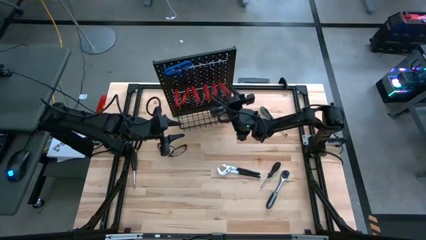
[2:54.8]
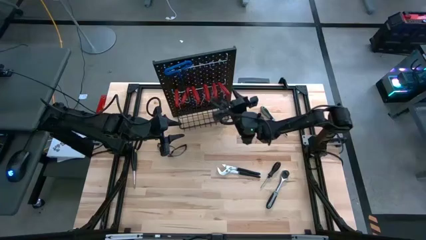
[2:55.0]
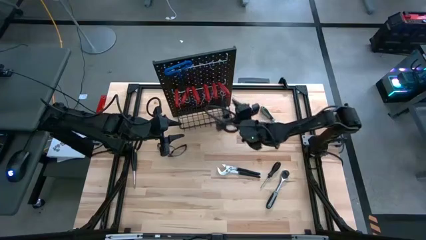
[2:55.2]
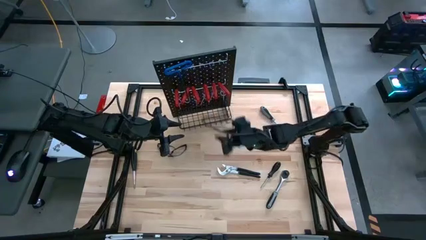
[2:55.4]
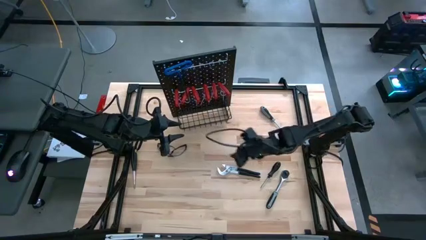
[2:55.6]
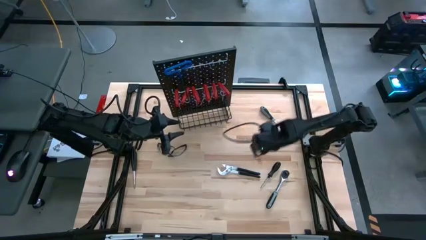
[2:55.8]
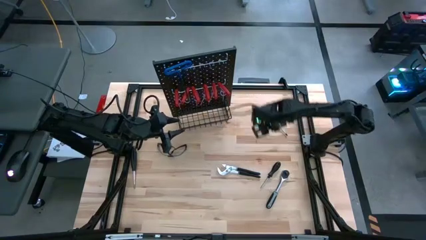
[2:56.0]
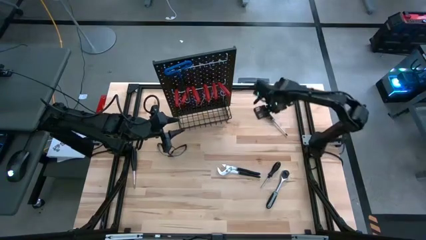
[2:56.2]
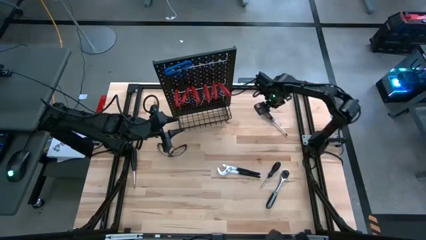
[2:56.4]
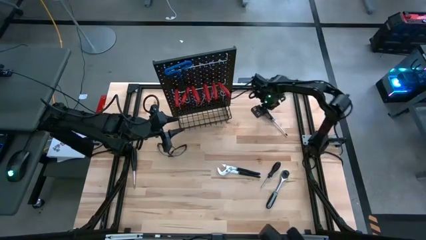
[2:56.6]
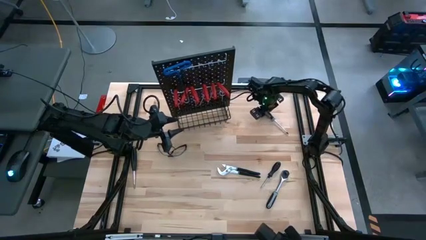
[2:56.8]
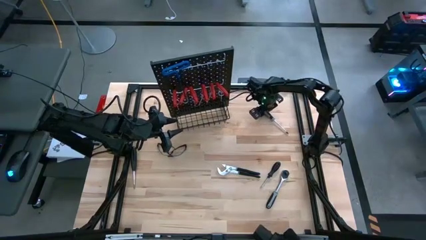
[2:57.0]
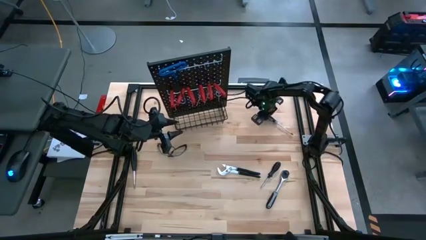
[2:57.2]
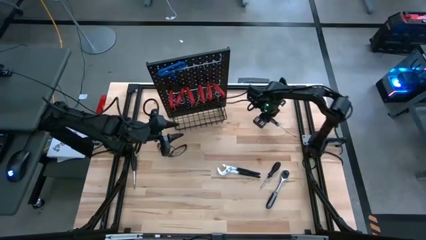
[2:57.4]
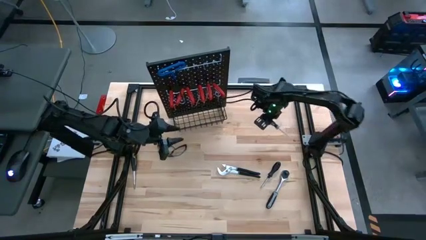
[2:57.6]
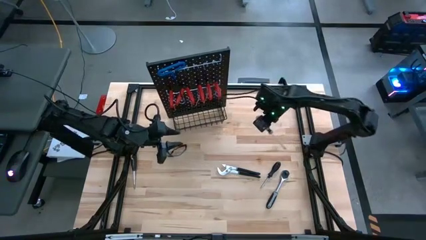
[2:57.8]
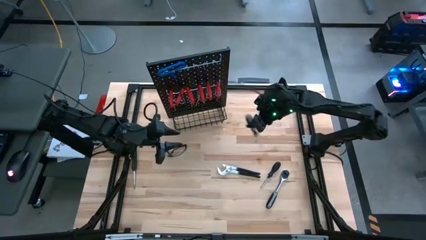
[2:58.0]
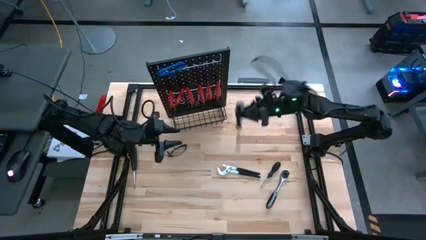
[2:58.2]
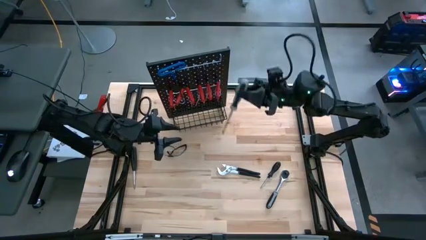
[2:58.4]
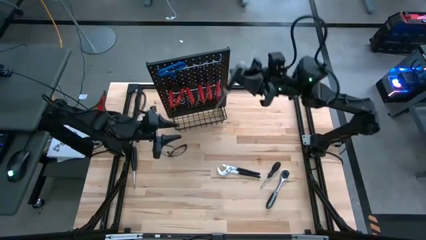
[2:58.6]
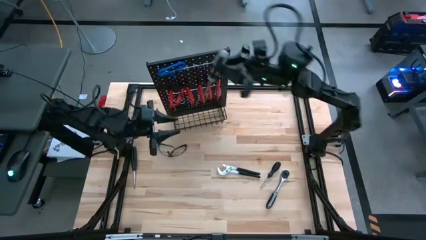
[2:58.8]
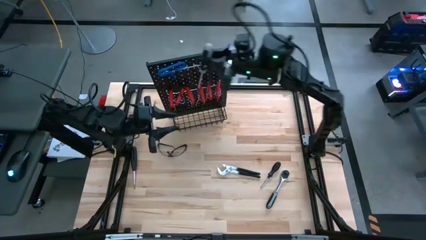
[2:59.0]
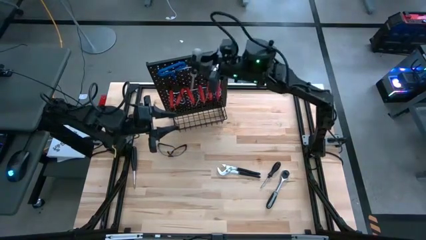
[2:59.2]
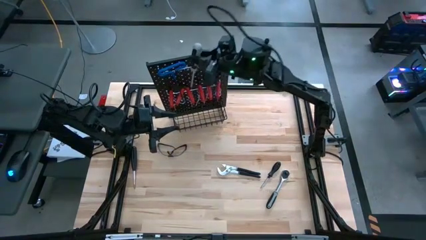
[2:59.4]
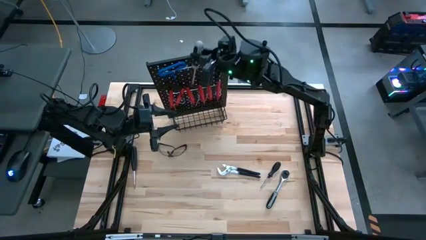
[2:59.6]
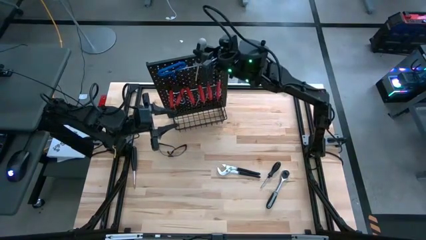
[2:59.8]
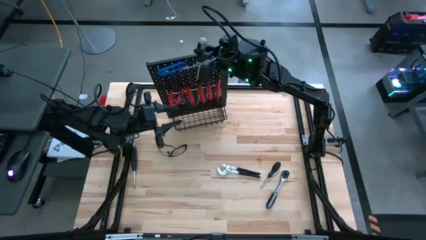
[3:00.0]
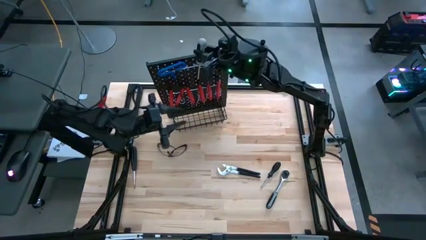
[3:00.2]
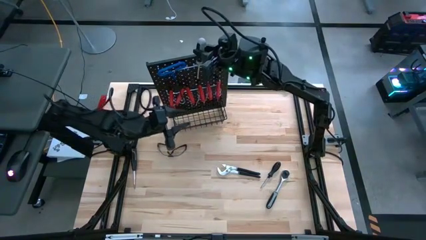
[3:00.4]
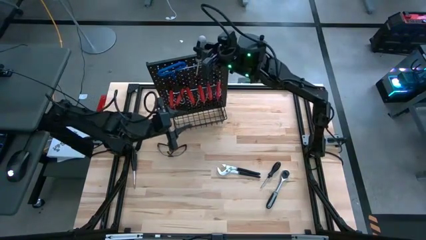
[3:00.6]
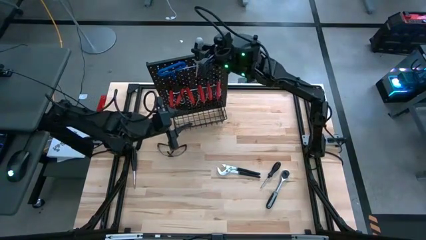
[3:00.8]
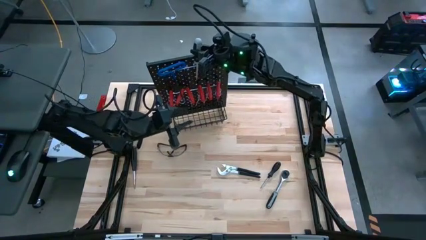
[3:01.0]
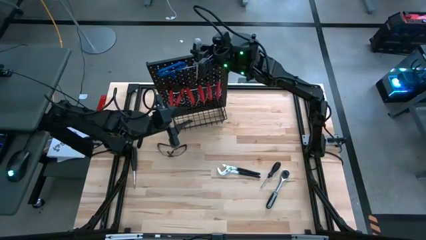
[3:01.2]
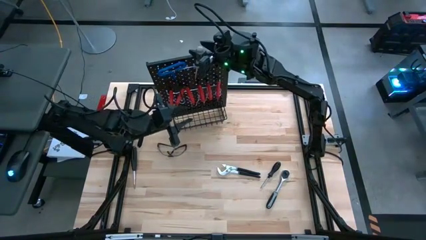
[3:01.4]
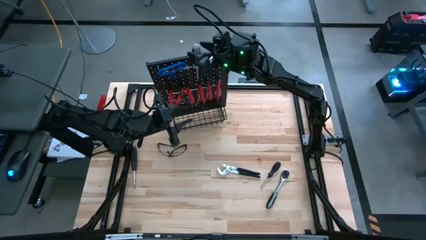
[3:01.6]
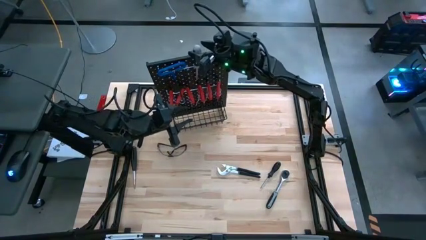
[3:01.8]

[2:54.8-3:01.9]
Task: Hang tools onto peg board
Hang the gray screwdriver on the peg board

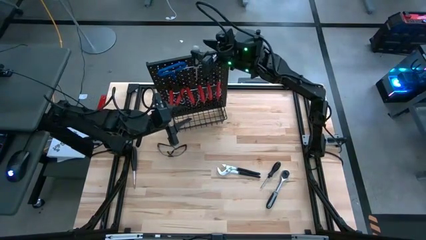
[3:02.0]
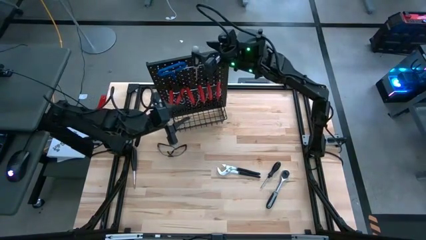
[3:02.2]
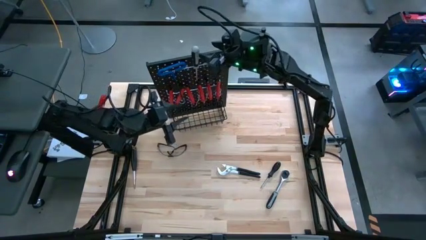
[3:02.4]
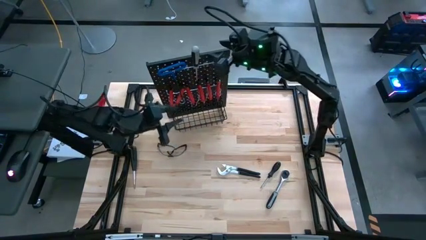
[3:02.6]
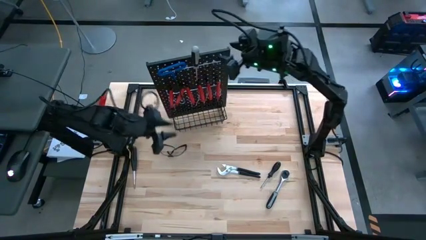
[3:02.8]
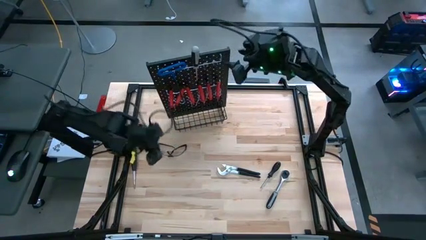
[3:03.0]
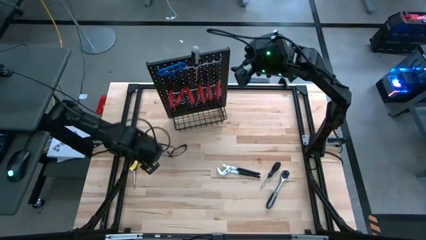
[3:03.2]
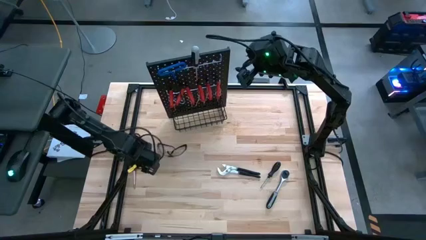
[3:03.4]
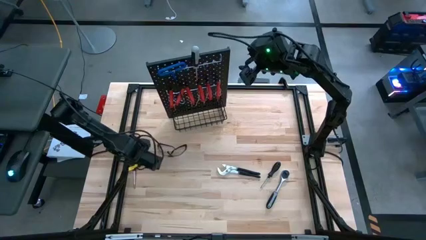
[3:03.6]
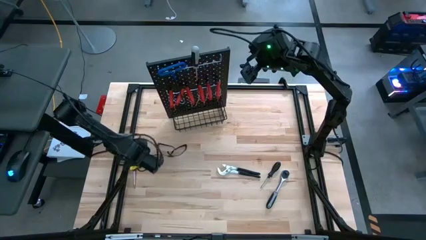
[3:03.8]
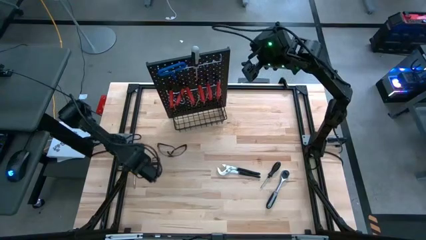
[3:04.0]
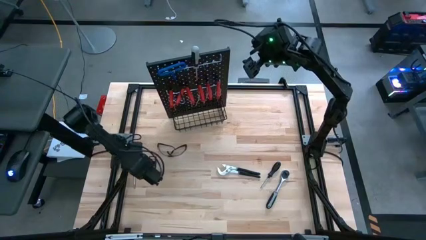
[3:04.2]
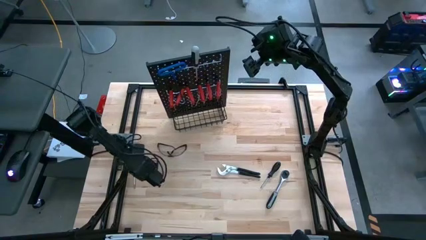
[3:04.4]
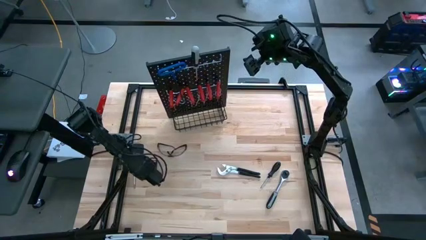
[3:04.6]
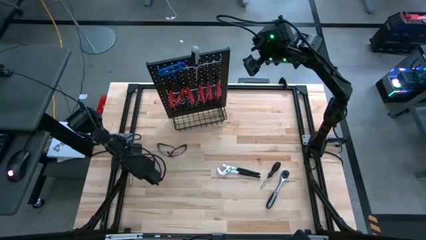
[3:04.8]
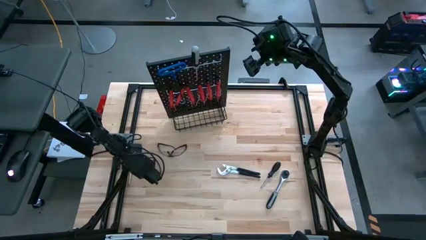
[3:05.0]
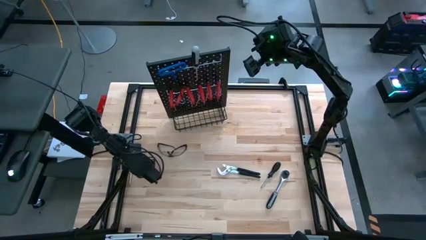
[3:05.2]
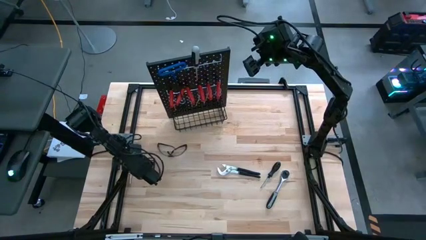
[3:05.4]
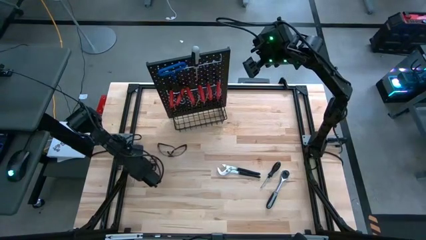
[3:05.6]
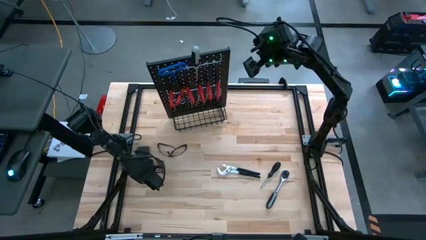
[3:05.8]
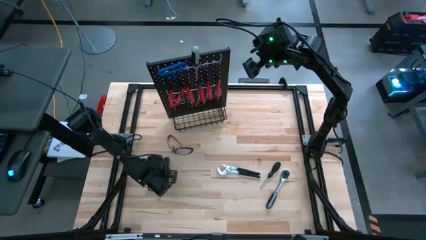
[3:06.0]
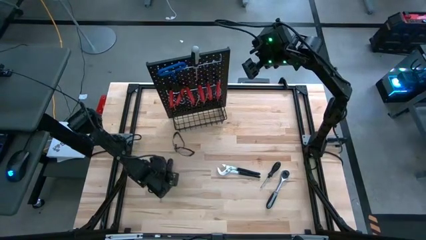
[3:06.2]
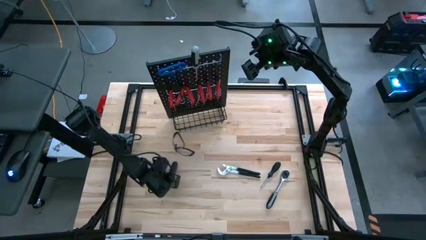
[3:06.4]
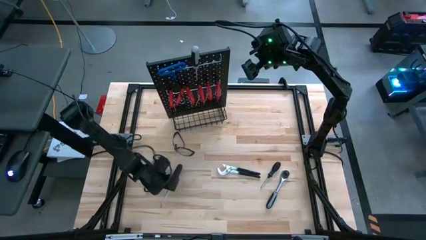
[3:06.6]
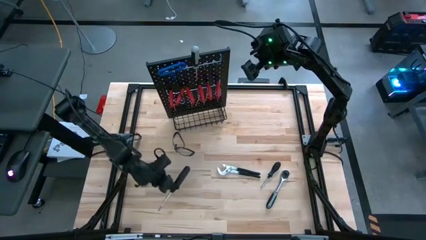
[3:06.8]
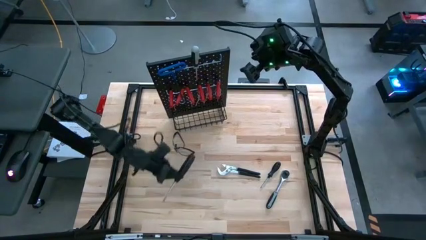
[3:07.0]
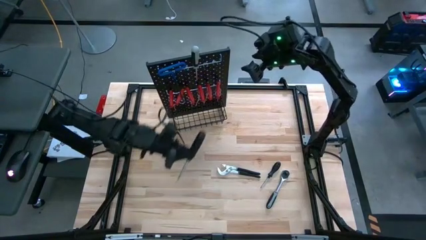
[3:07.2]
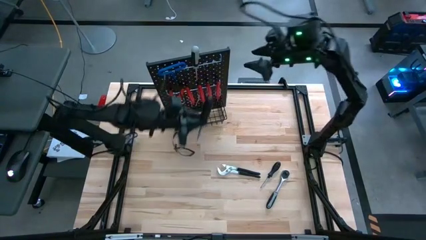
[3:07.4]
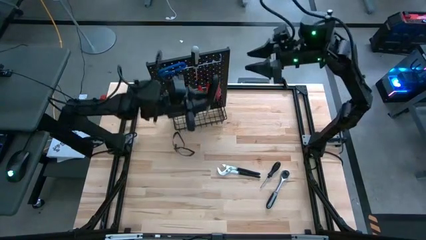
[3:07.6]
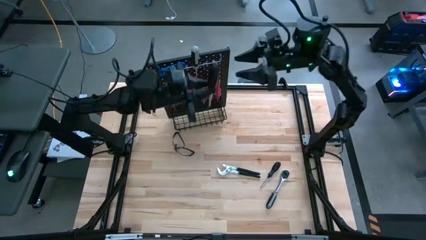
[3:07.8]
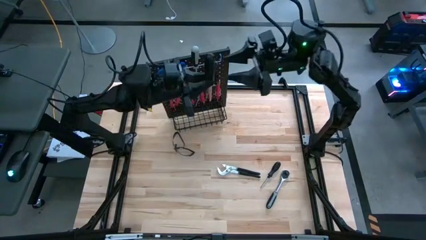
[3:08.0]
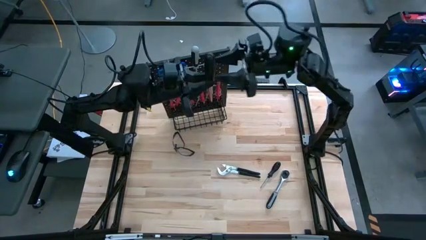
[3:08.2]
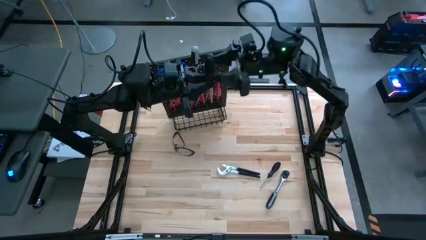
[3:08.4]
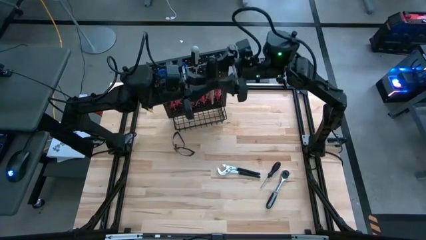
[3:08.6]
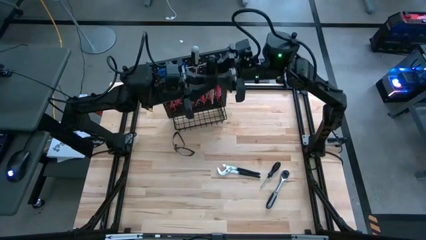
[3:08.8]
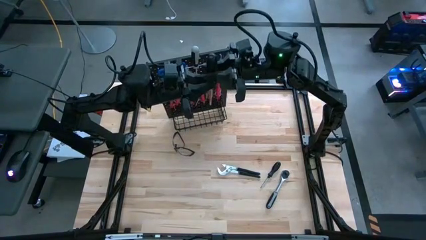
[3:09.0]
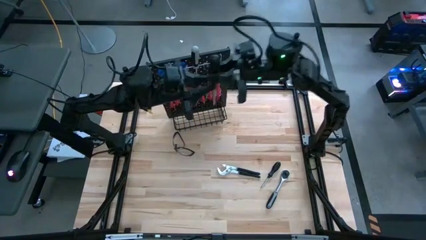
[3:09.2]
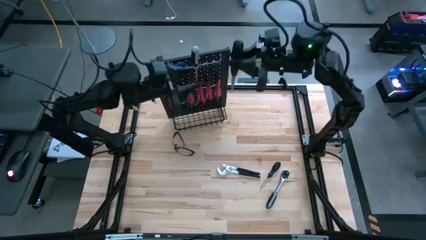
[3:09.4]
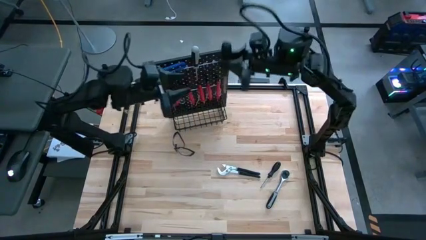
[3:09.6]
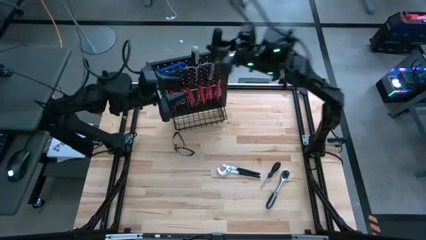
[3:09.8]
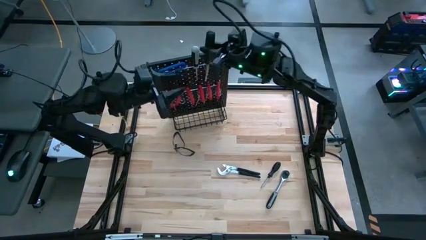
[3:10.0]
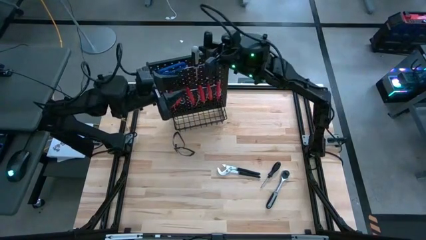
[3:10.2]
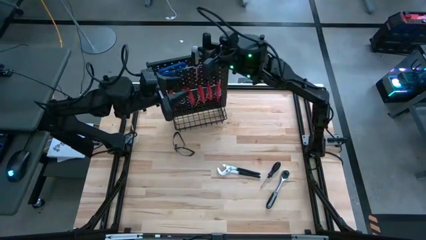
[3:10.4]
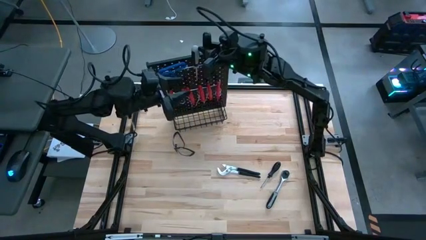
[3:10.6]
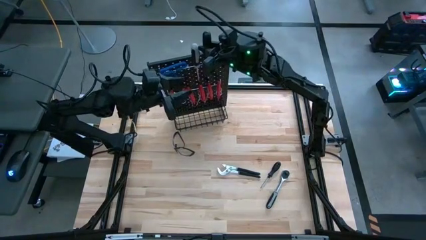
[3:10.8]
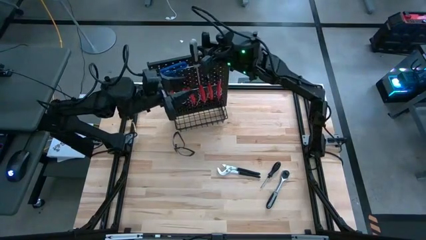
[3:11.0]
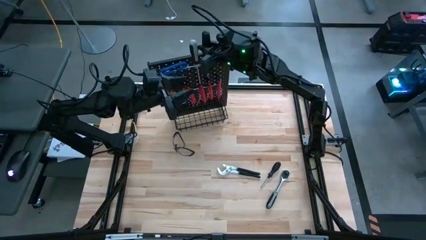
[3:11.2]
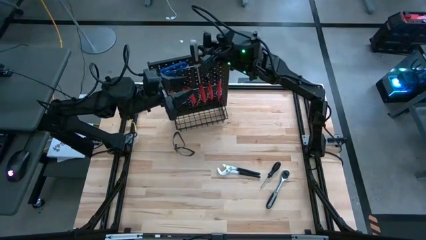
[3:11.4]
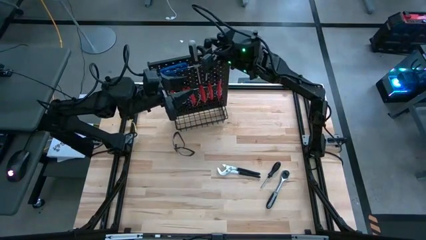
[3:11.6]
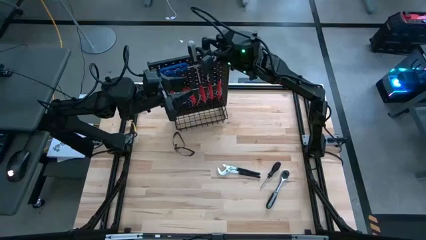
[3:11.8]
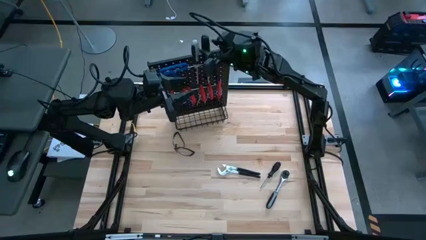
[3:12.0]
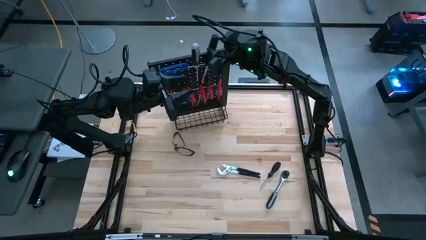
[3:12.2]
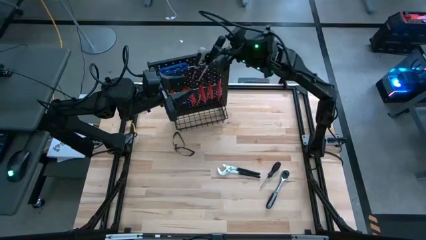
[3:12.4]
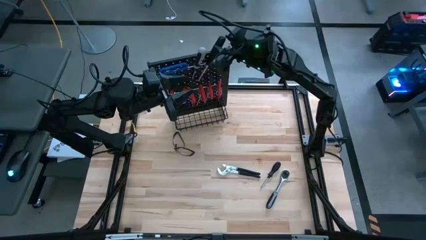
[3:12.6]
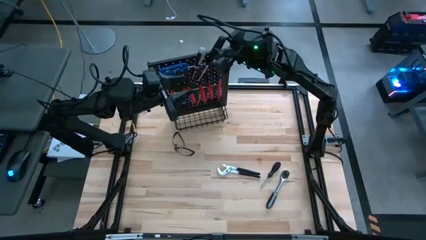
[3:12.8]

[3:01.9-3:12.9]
Hang the left black screwdriver on the peg board
